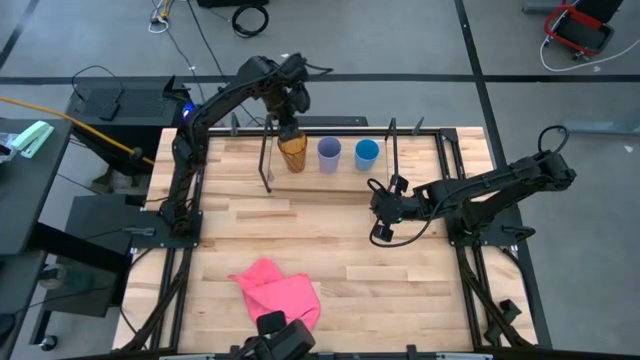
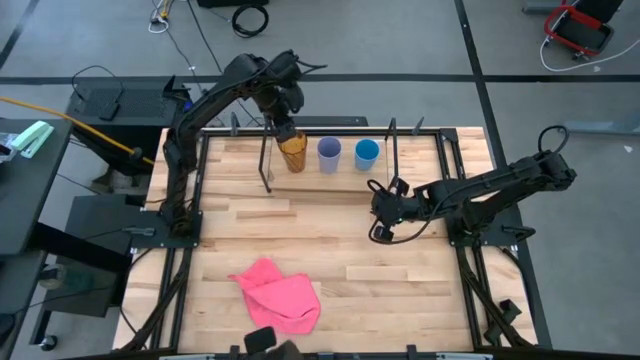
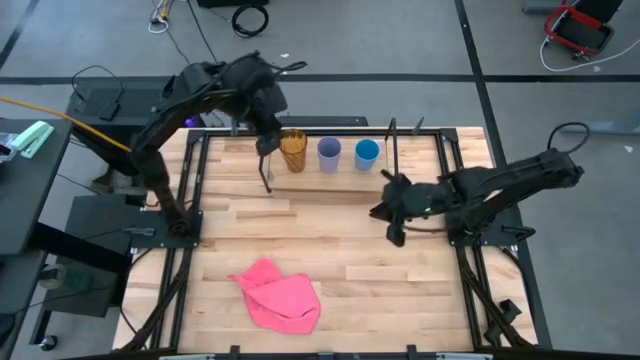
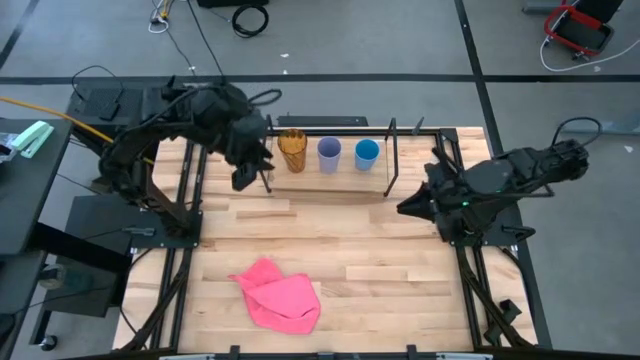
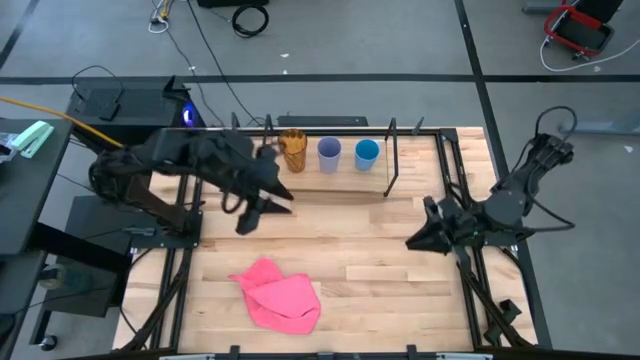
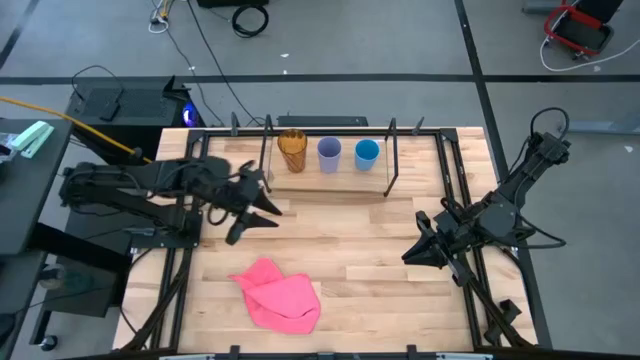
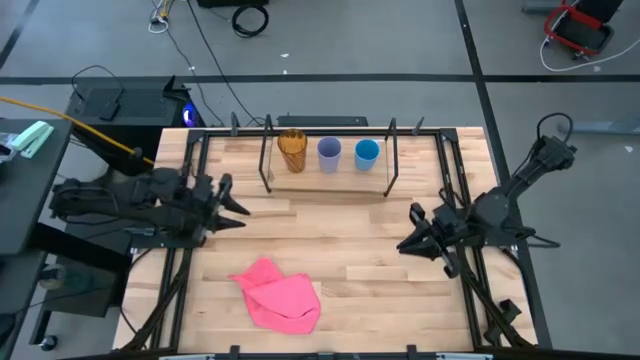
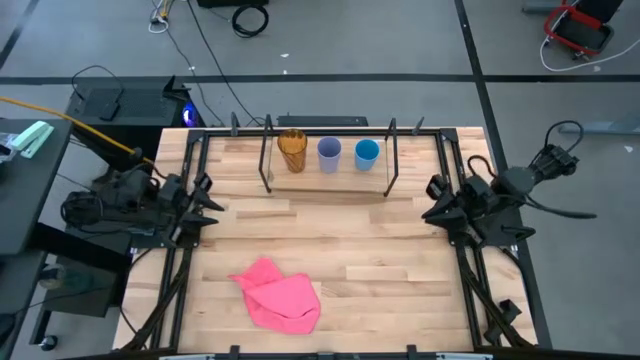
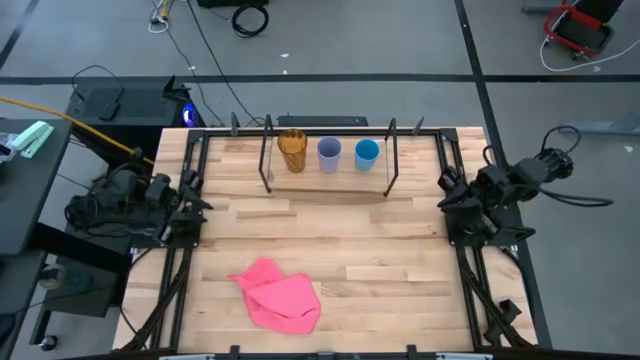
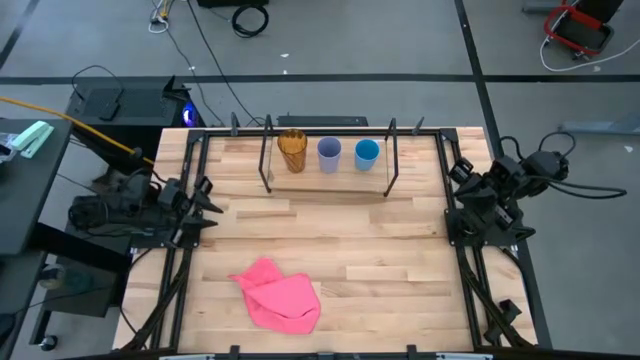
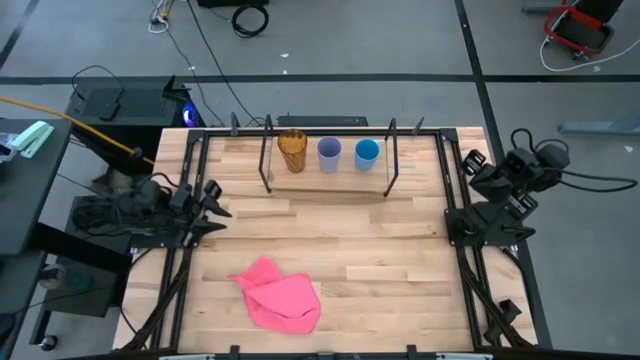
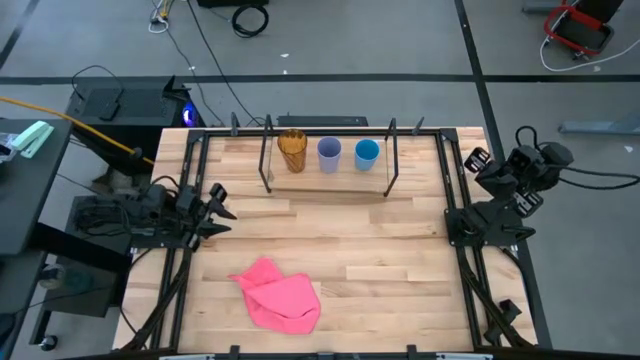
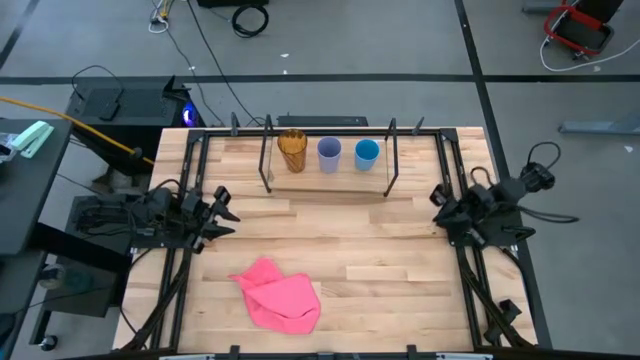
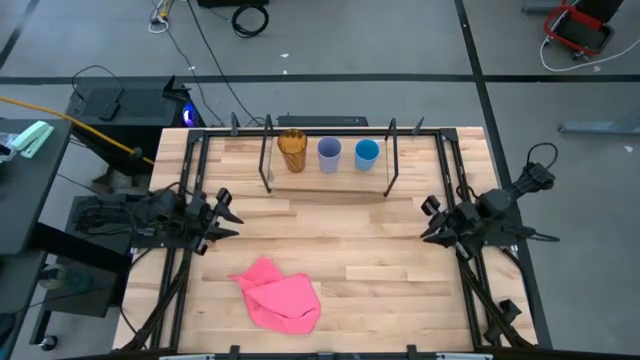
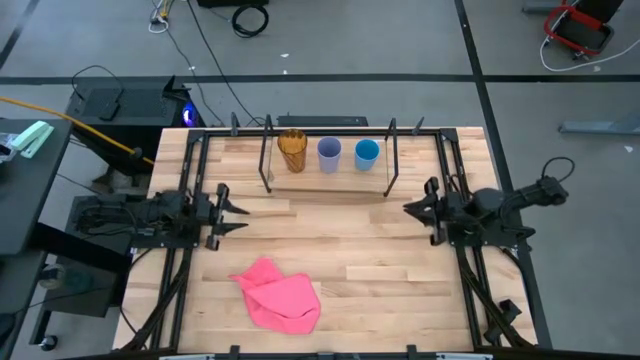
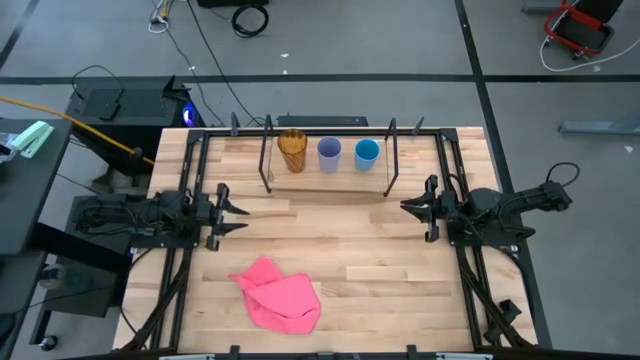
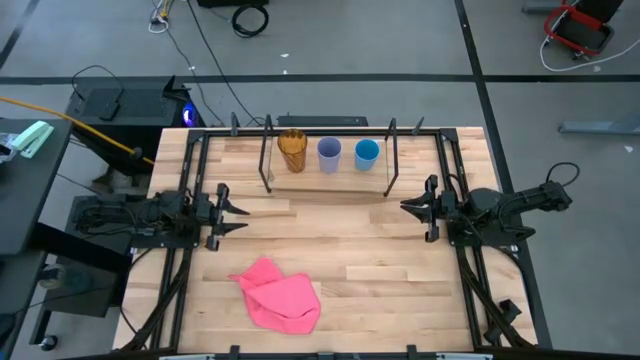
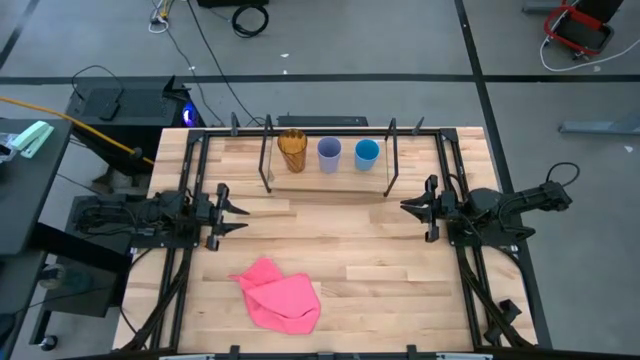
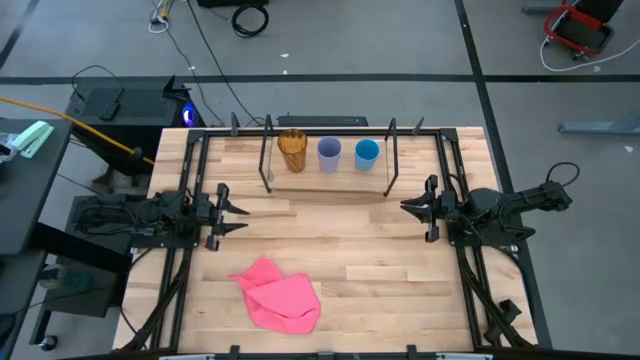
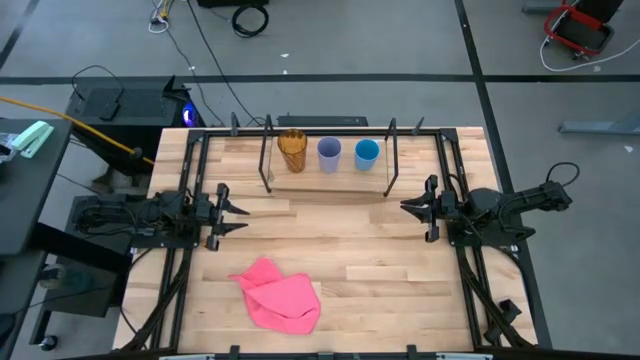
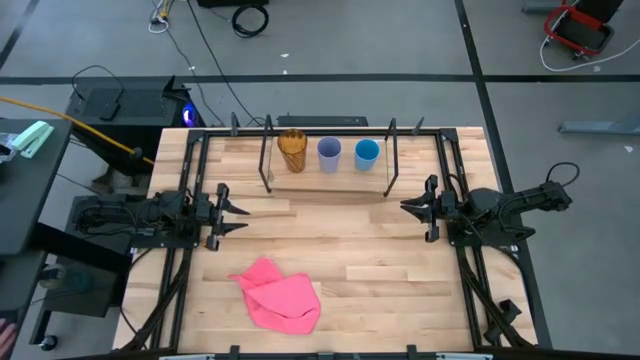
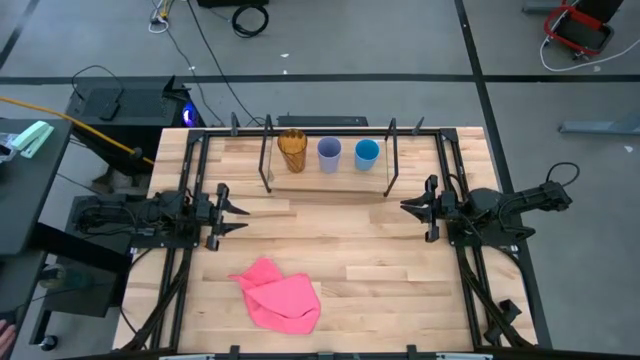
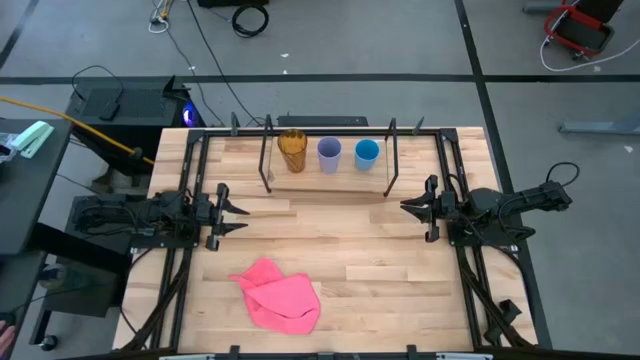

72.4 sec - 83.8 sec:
Task: Stack small to large cups/mugs on shelf
Return to Home Position

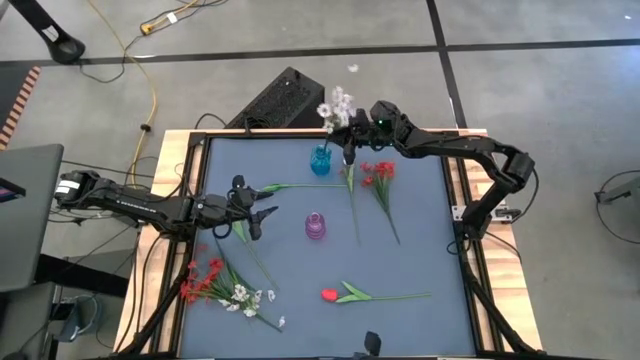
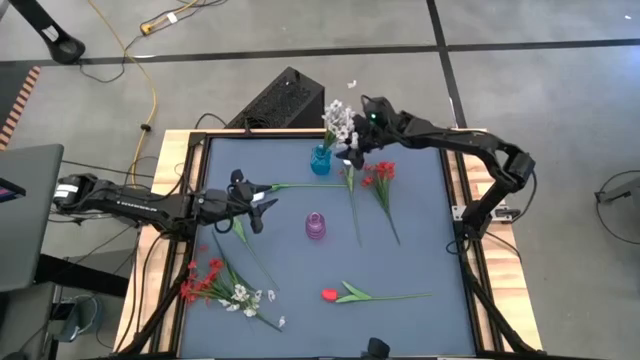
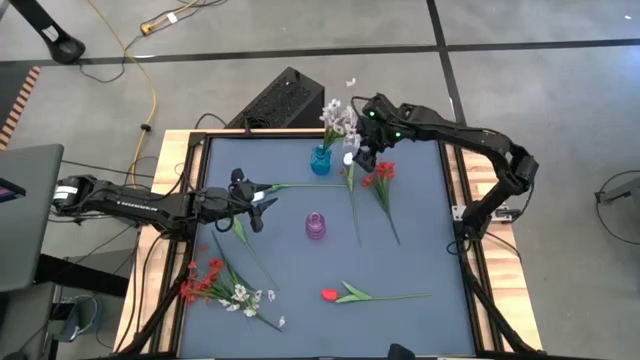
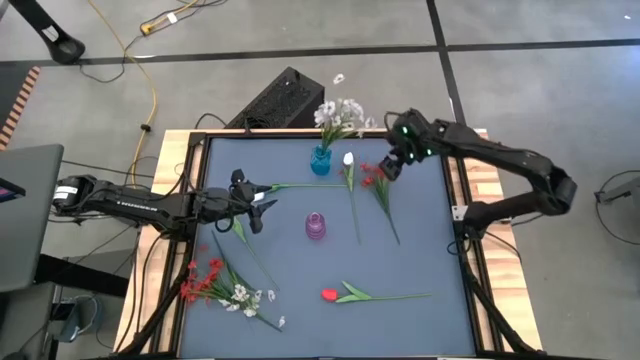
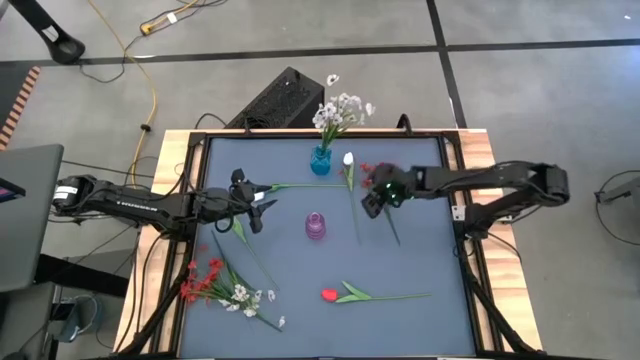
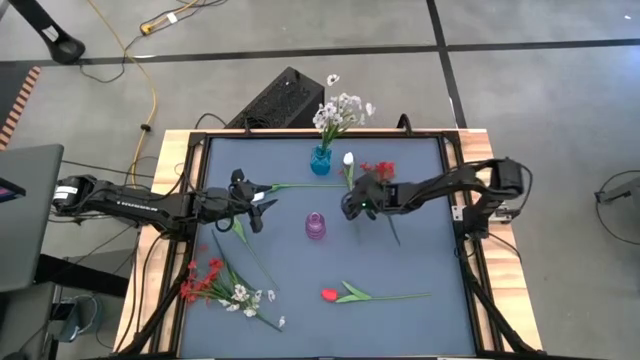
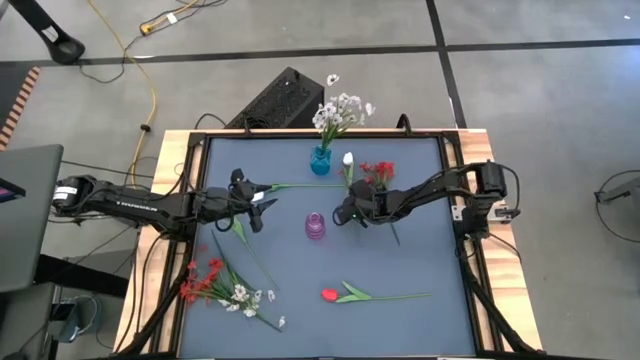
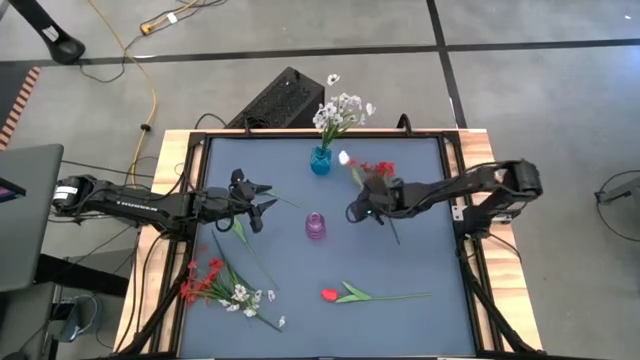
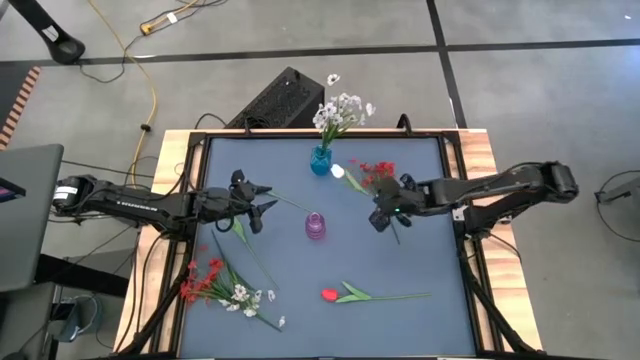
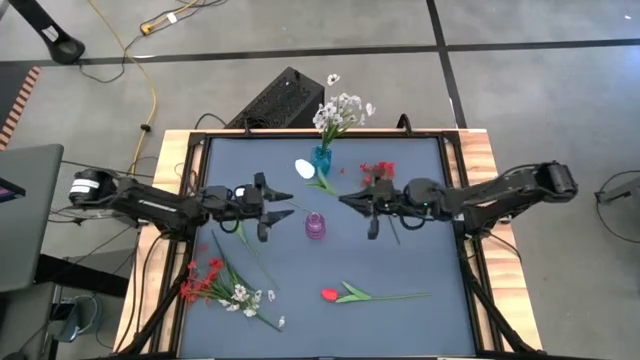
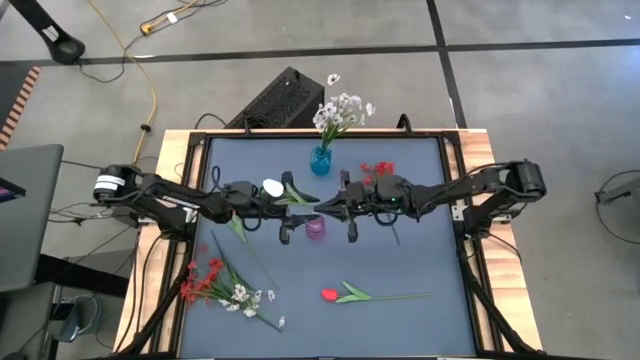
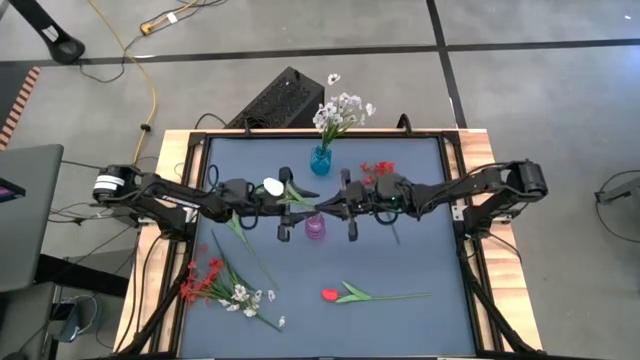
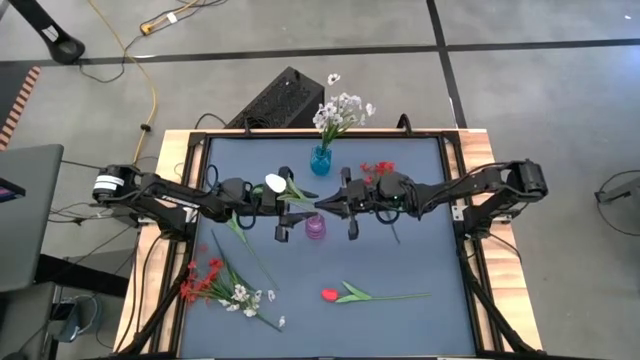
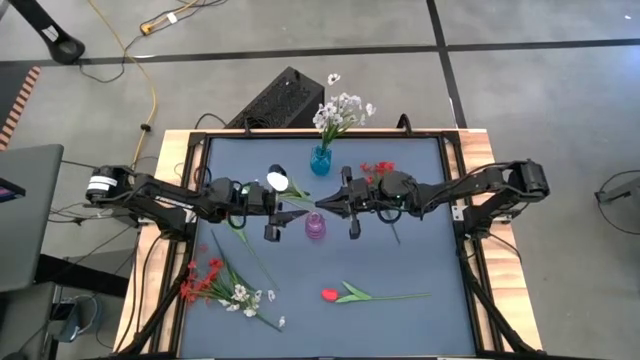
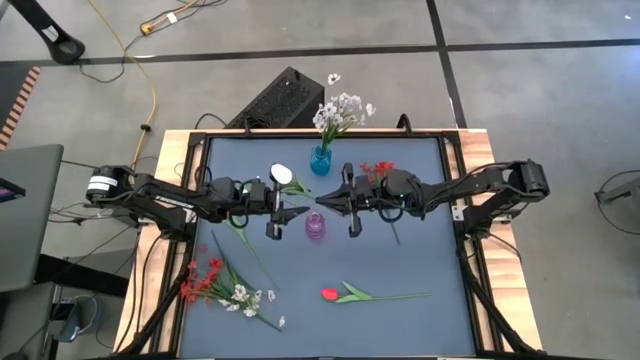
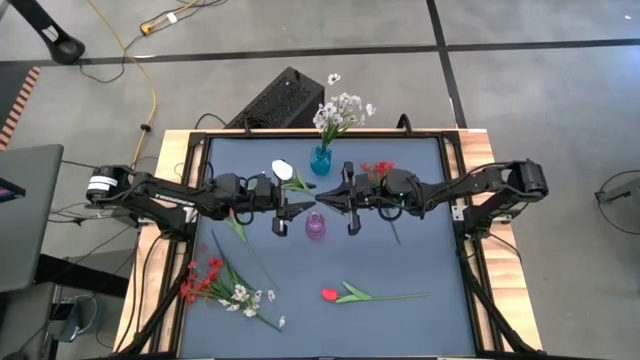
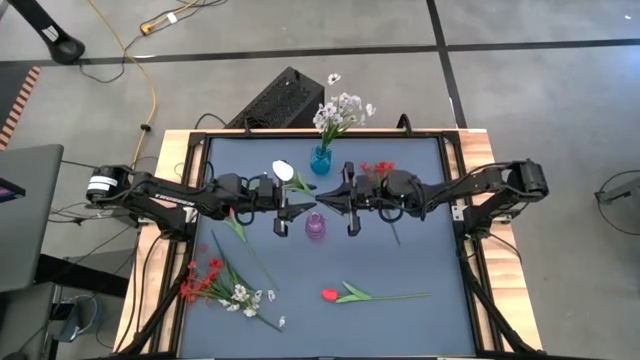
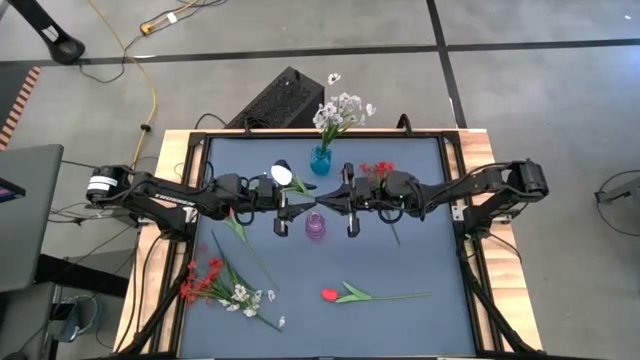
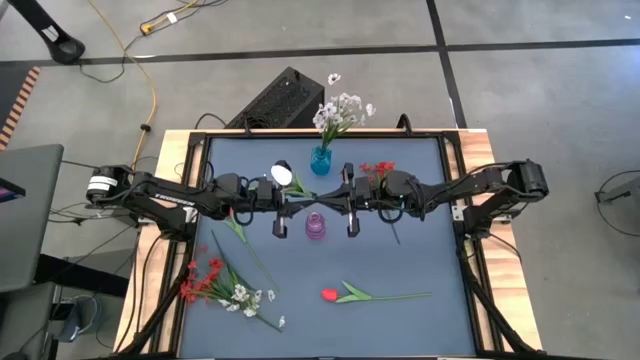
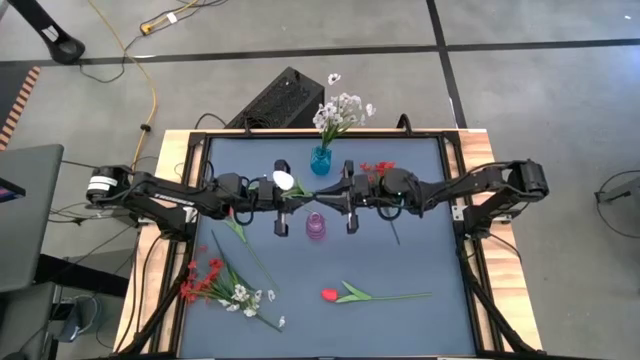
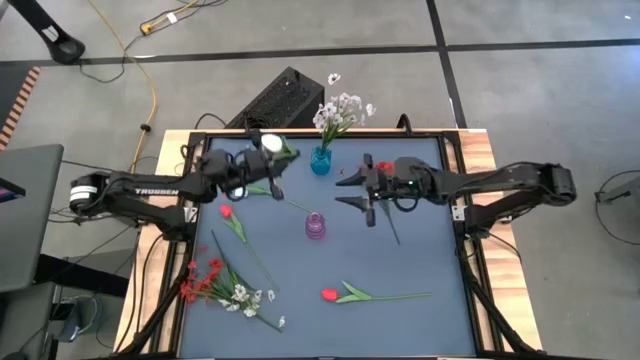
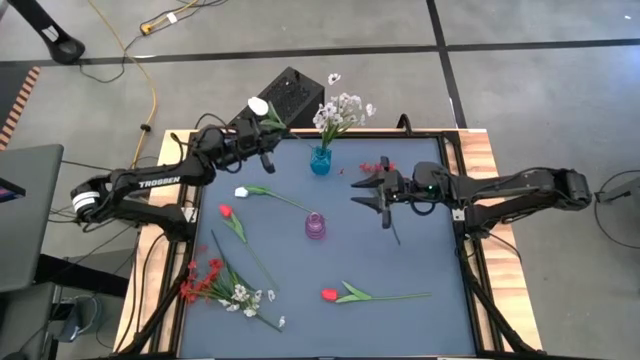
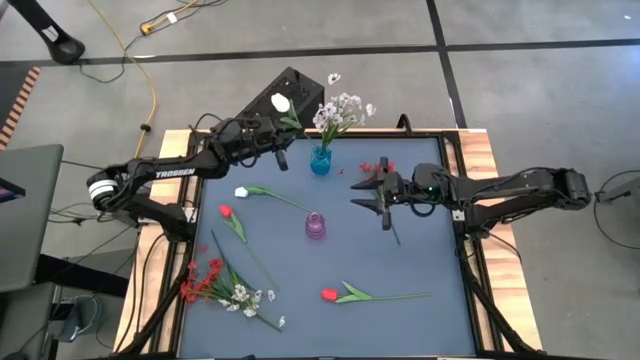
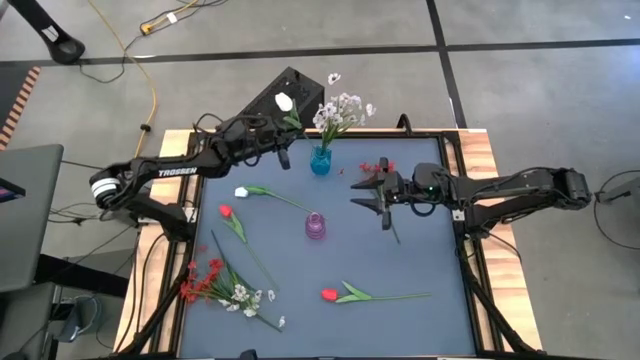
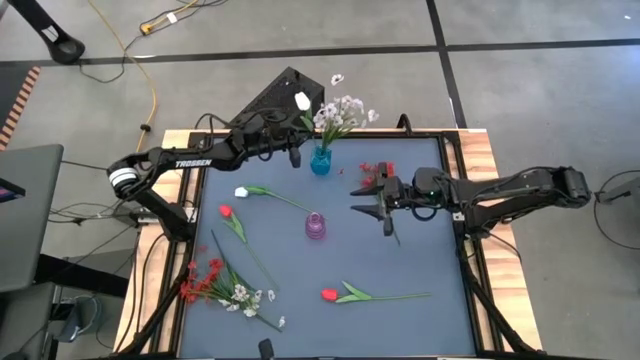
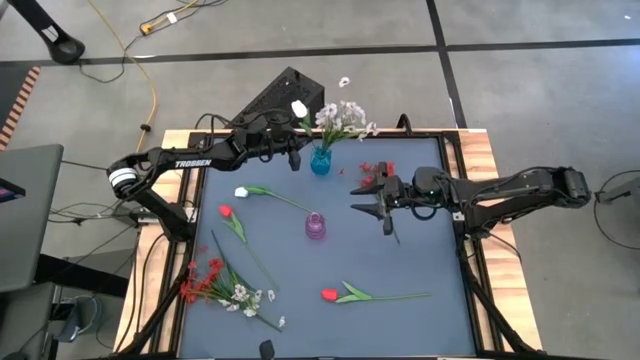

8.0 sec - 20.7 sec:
Task: Sort flowers into vase by color
Put the right white tulip into the blue vase
